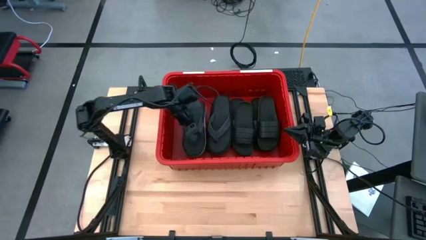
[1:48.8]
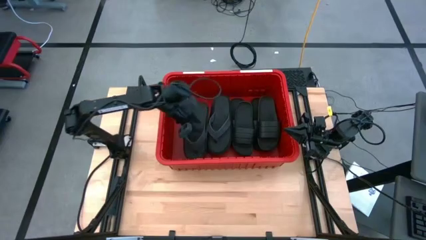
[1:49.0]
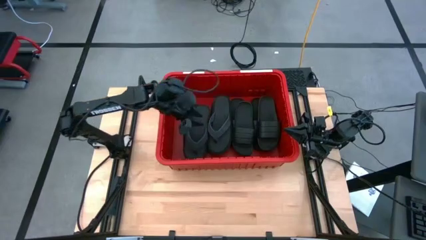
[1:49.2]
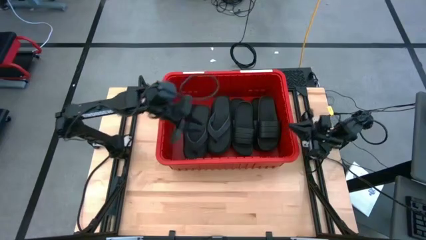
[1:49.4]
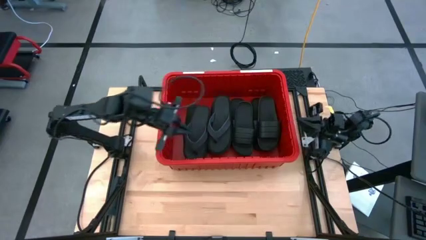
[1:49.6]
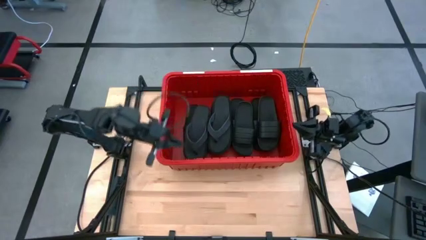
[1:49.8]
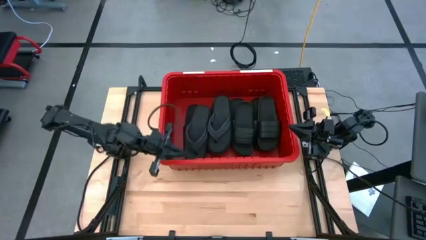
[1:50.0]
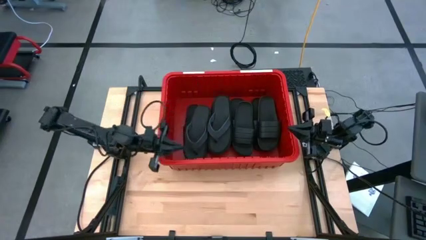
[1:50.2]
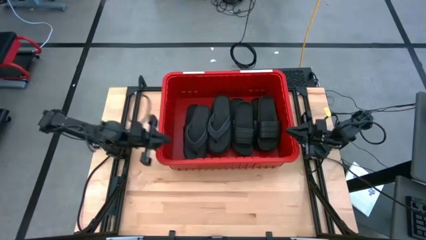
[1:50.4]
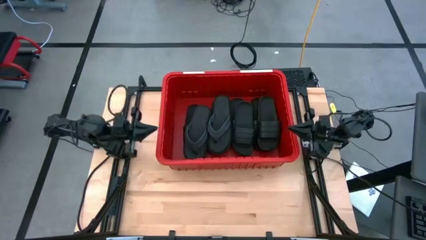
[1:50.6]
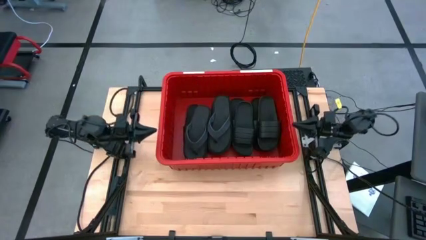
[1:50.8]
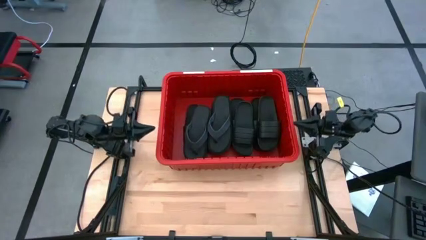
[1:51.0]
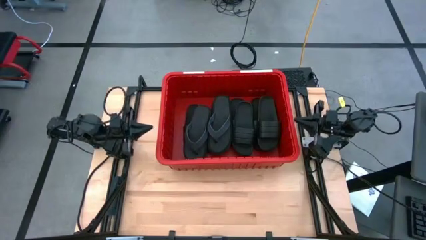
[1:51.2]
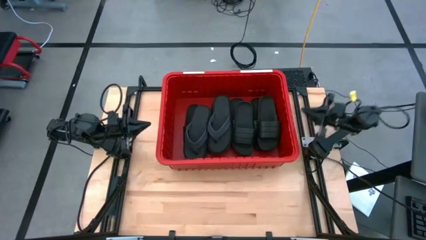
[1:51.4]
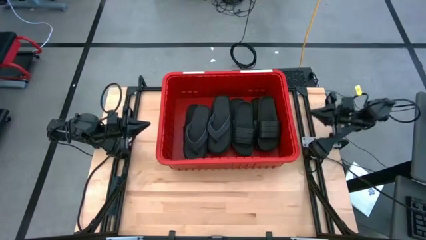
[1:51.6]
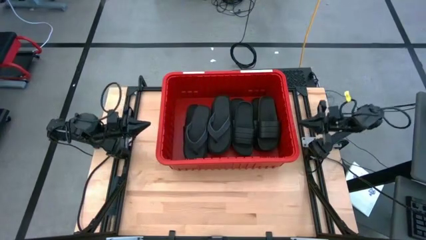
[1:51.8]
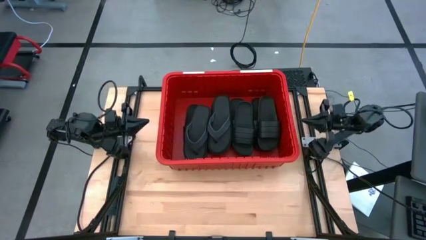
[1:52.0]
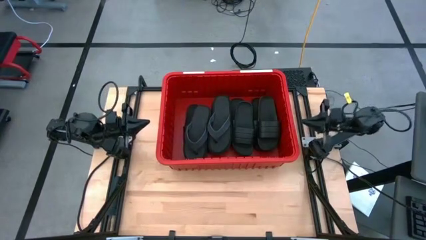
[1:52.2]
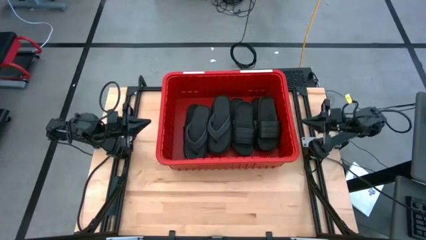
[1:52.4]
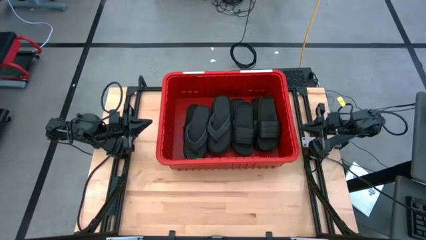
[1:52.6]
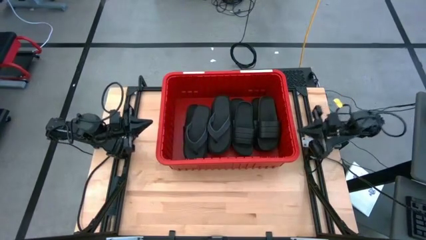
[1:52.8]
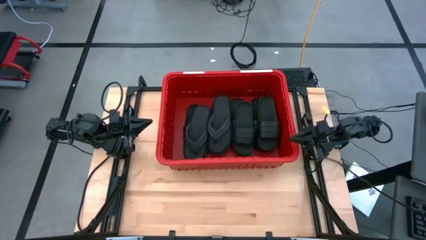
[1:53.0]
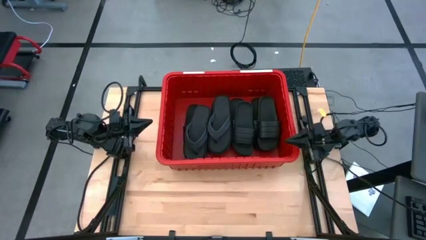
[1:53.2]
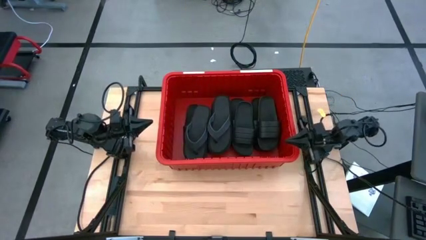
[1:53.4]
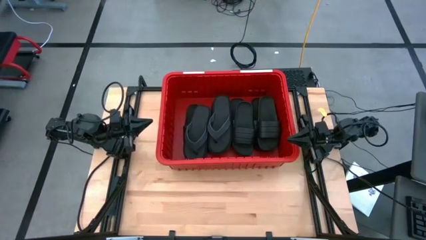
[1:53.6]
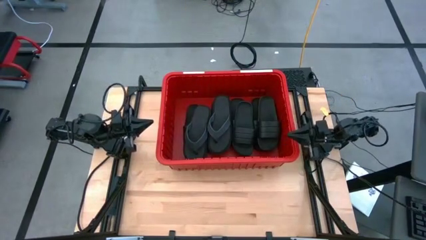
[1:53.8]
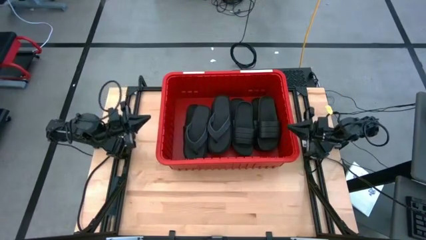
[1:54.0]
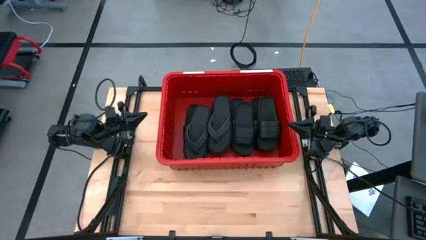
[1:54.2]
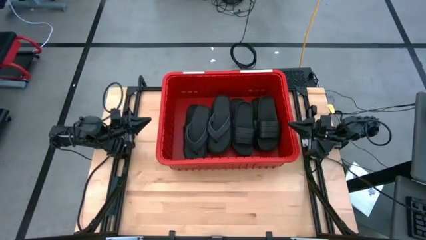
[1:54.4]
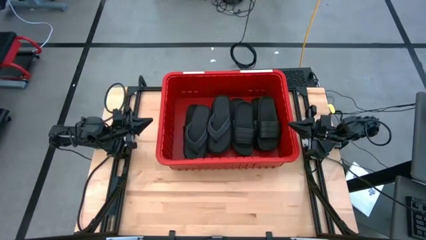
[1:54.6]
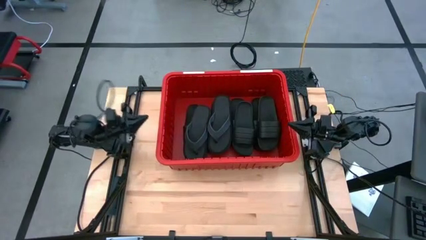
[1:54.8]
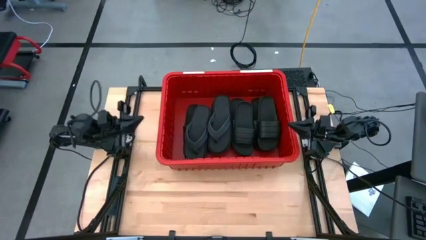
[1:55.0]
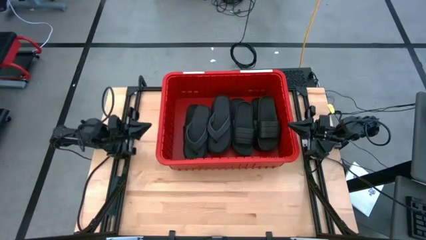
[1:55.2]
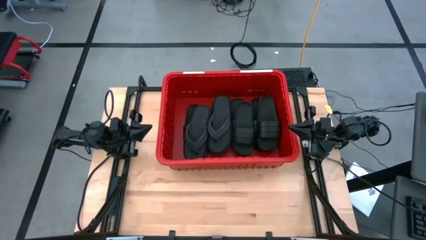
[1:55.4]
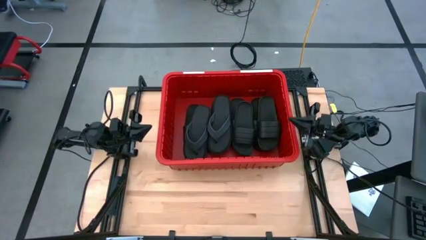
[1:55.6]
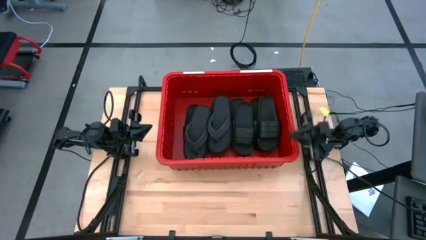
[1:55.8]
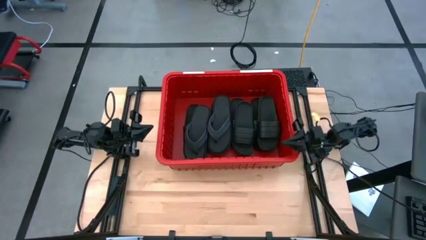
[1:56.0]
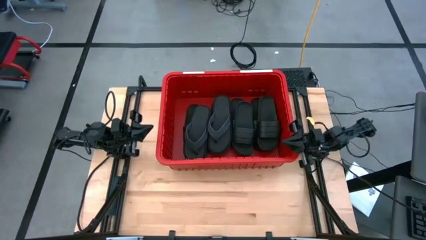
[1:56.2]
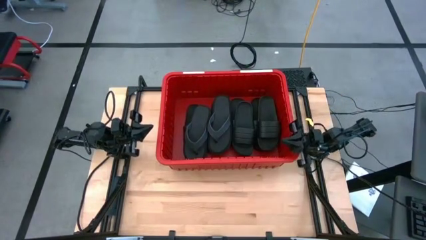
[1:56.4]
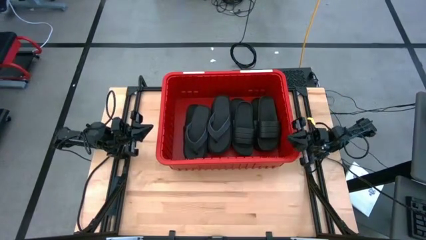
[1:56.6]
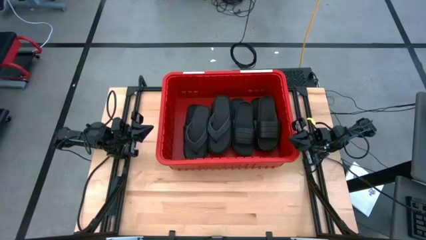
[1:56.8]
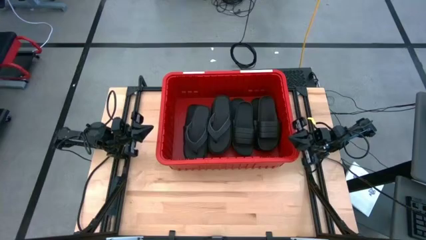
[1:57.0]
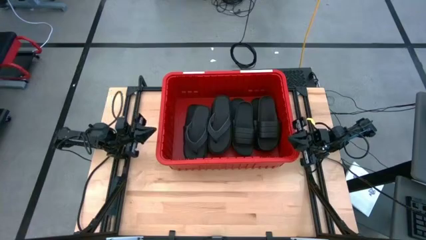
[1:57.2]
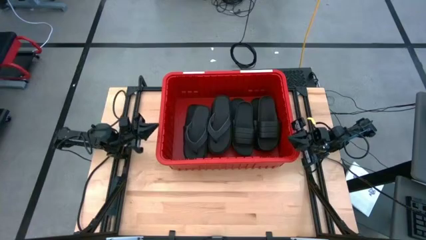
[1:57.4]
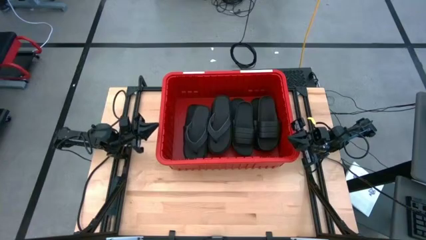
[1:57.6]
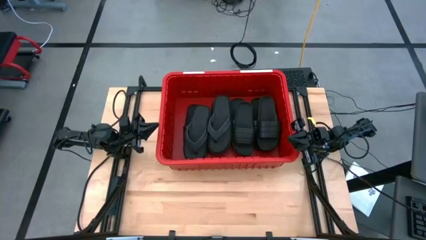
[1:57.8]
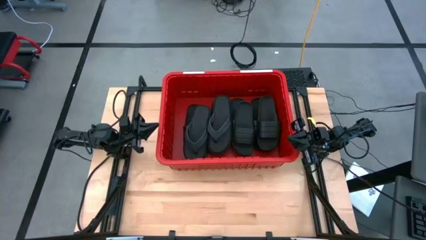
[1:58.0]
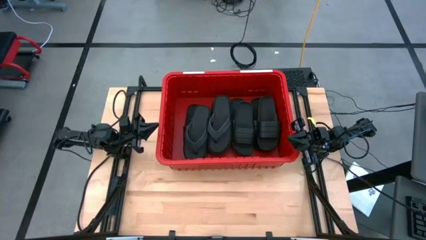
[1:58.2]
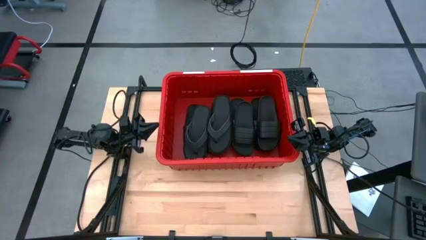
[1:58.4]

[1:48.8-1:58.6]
Task: Pick and place slides into bin
Return to Home Position

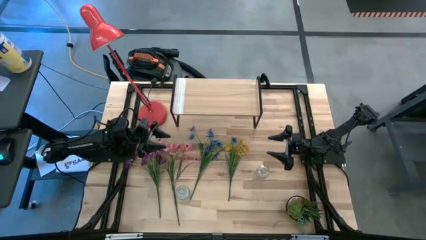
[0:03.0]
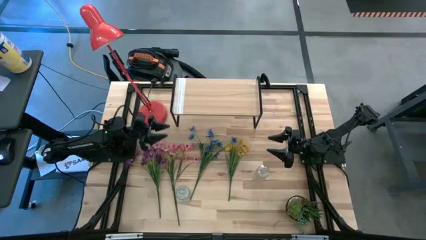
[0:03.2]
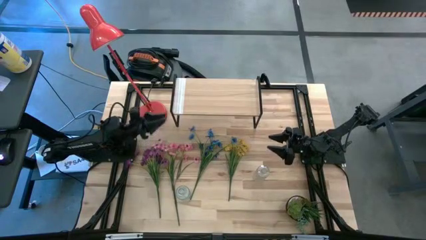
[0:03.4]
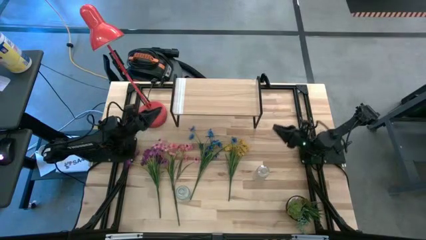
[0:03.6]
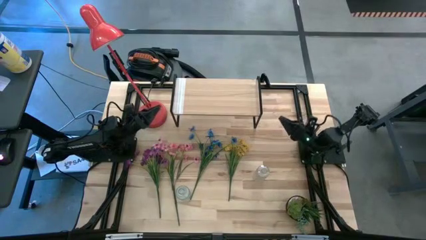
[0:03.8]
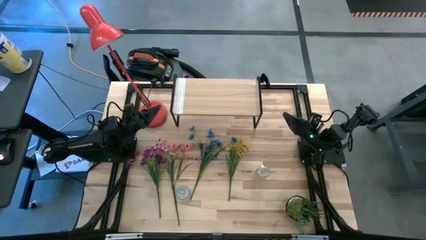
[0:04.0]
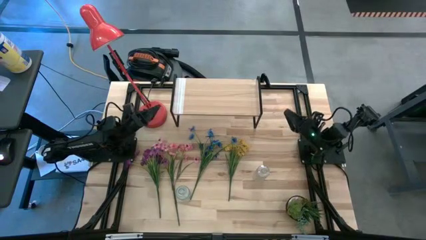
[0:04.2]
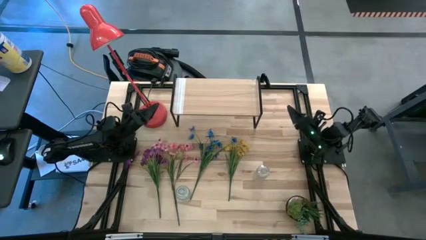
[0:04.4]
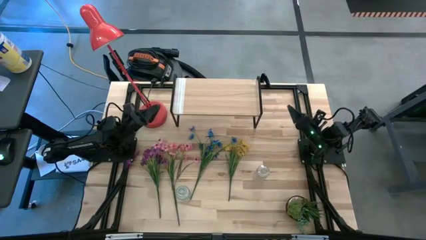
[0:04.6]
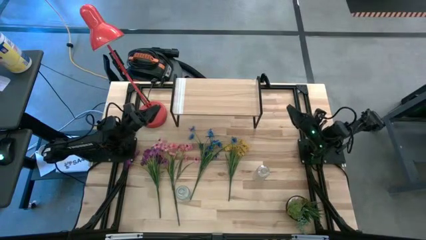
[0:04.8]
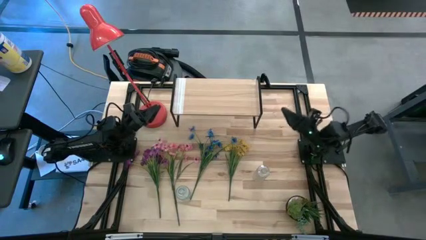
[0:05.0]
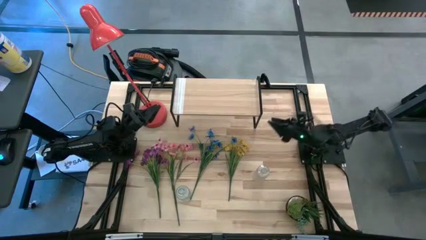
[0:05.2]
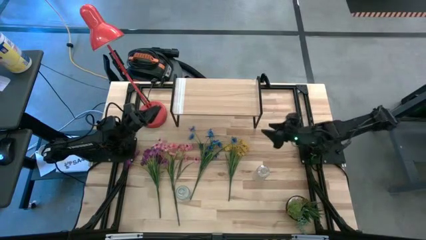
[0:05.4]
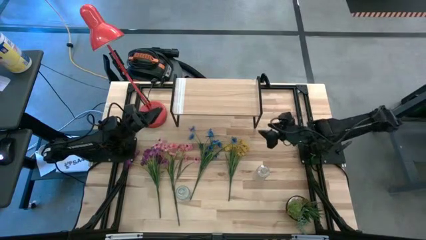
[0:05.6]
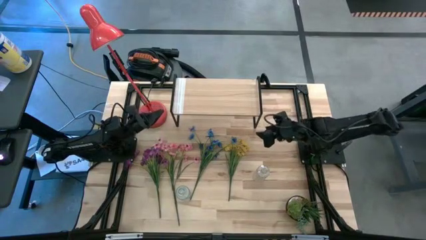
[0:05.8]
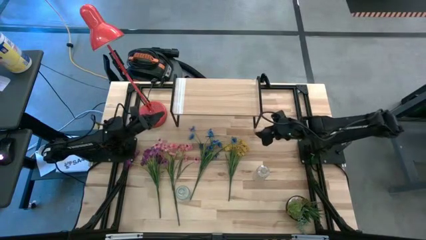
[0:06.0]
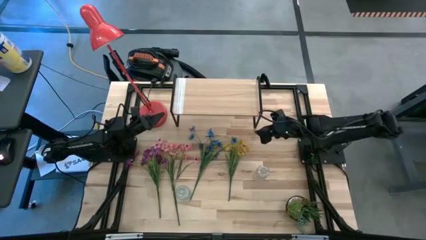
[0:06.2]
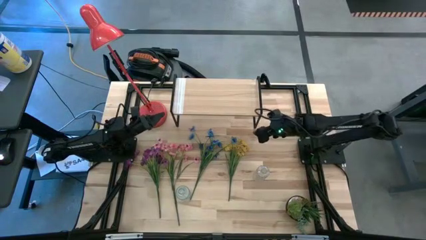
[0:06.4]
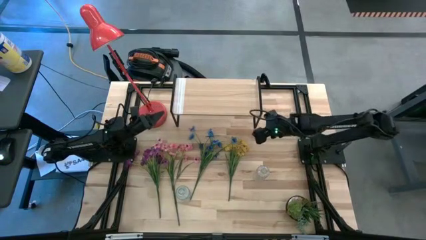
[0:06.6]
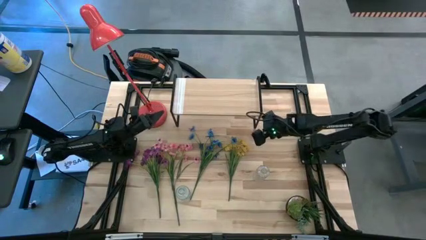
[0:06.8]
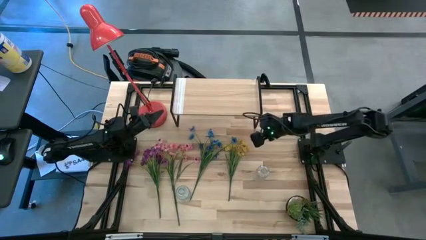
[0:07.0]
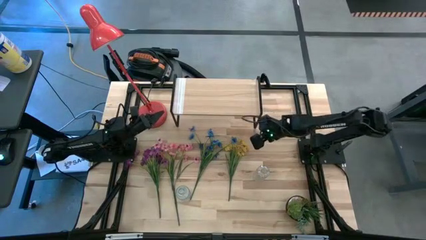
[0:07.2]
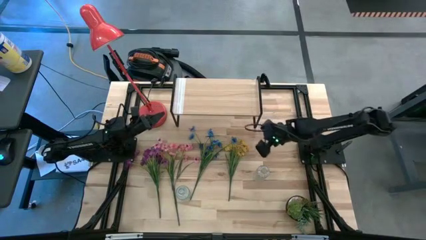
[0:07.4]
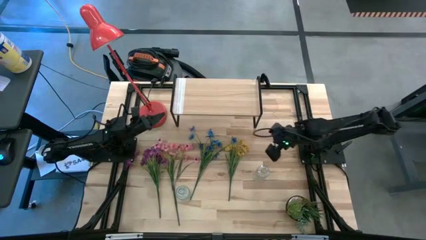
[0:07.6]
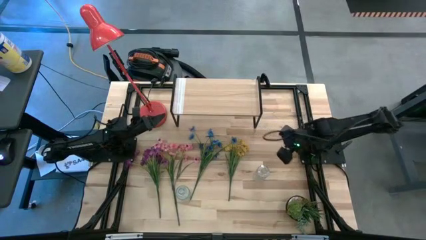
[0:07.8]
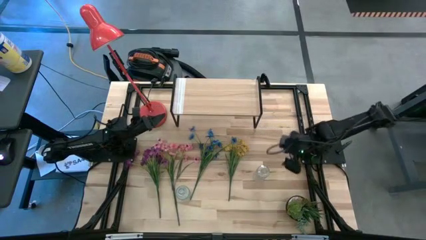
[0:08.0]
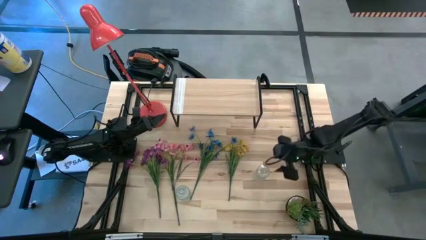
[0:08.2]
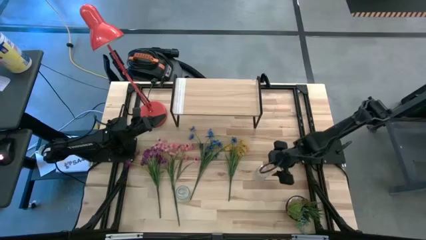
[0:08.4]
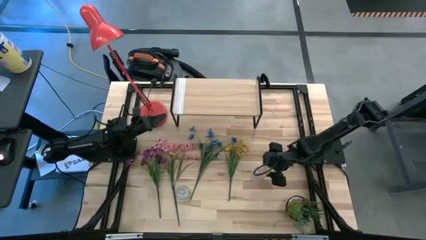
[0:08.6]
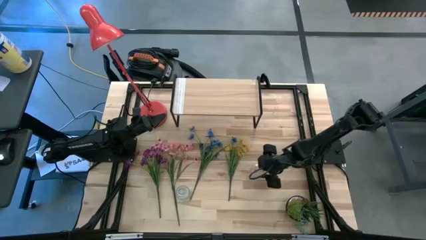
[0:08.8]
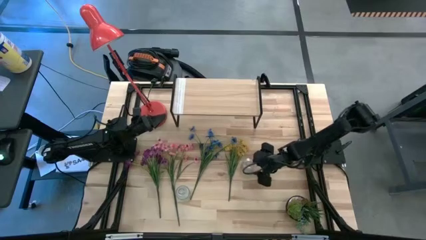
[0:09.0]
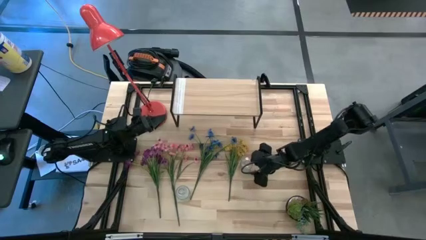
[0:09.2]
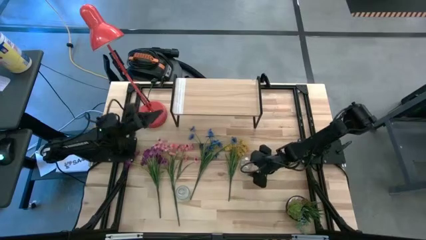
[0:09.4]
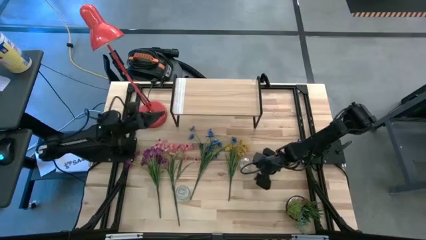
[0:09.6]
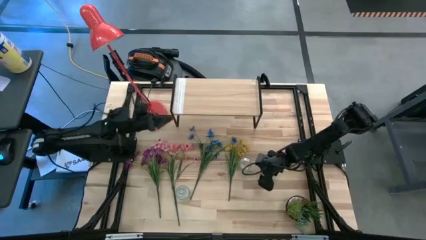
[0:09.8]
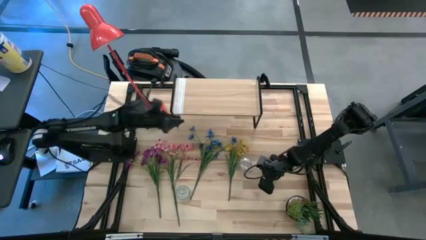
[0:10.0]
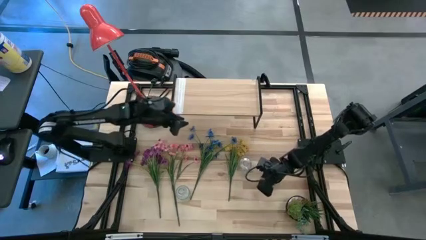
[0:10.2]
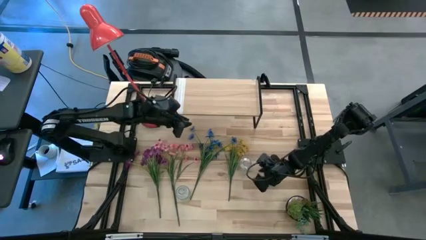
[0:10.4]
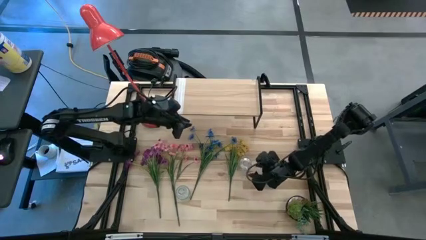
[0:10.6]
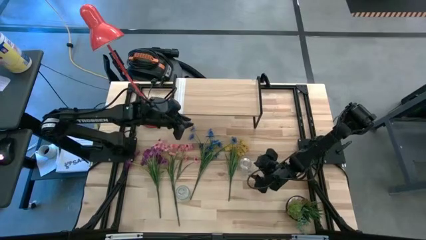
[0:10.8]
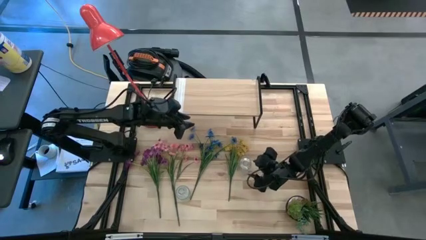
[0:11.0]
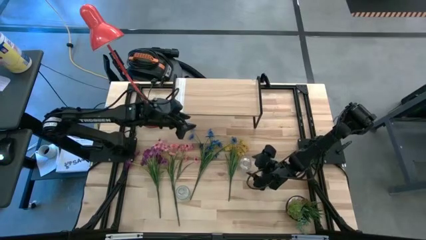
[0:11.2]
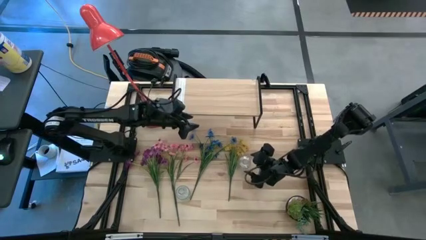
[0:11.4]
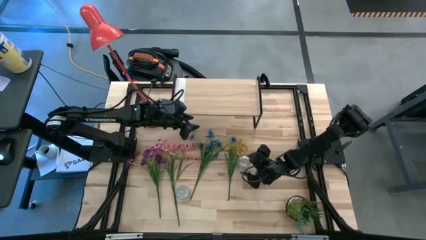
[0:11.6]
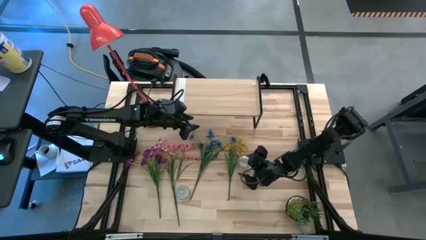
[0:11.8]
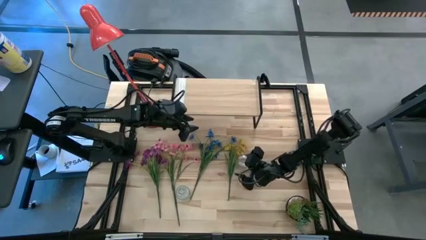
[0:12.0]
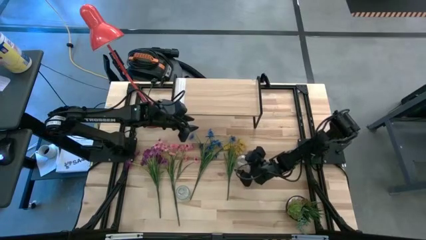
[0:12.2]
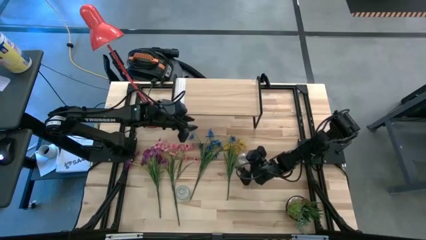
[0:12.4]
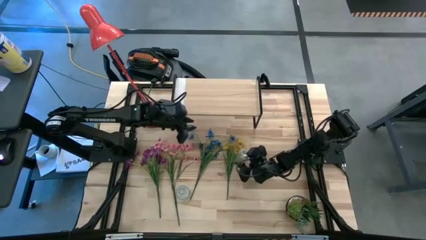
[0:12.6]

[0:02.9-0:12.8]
Task: Pick and place flowers into a vace then onto a shelf
Put the yellow flowers into the top vase
